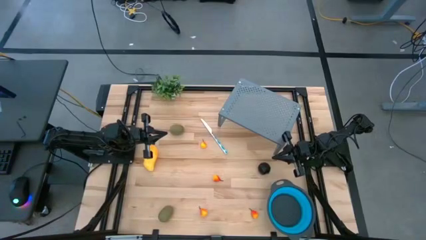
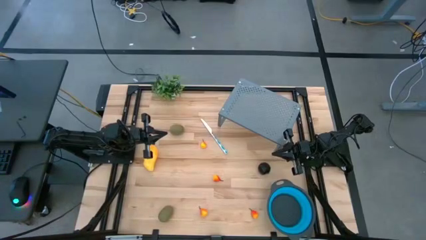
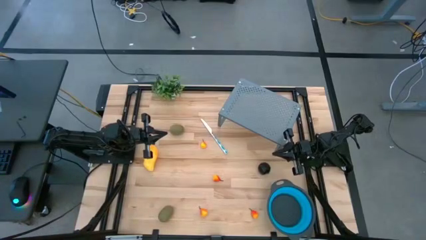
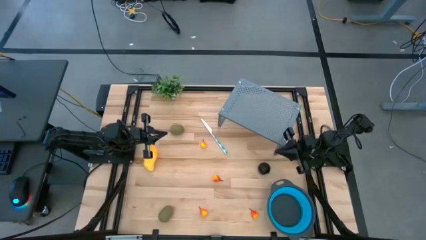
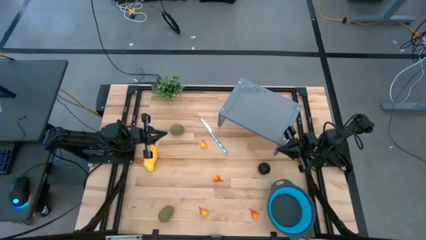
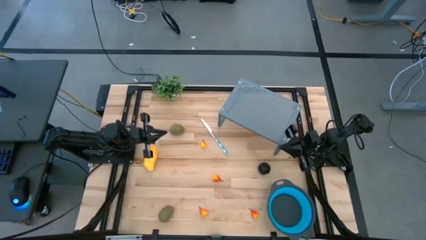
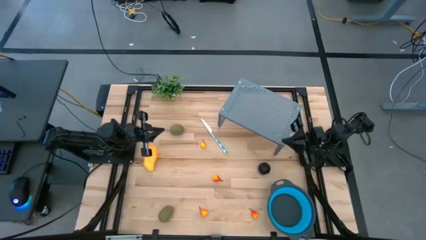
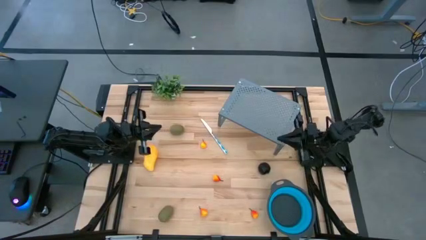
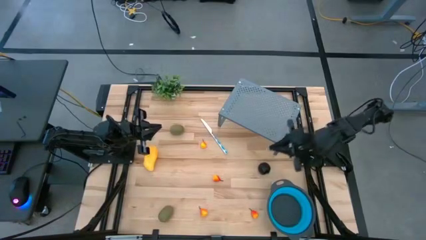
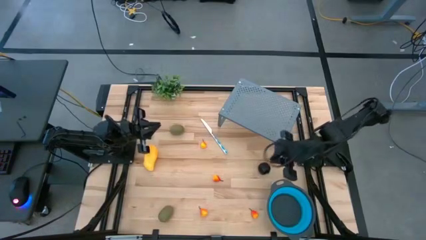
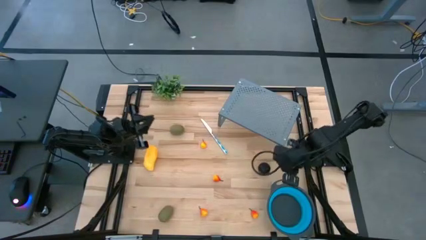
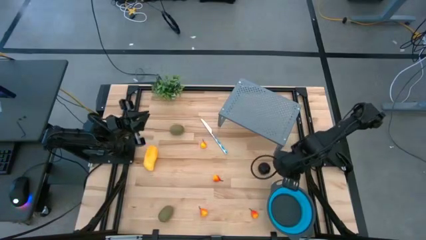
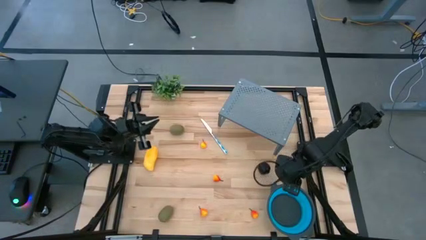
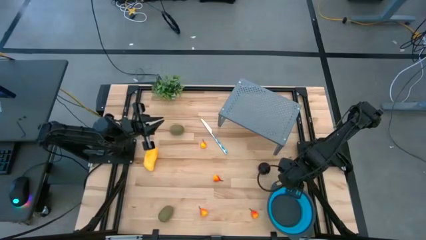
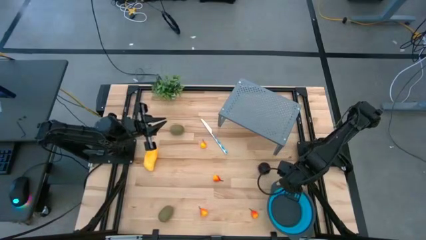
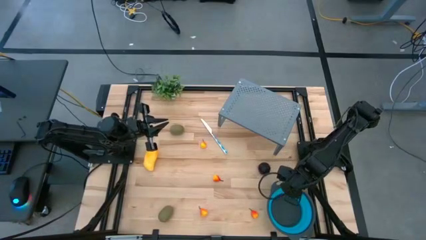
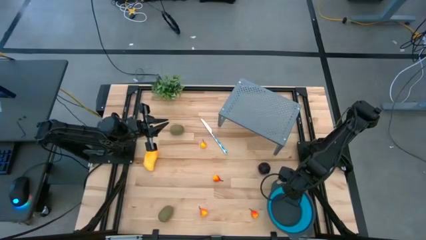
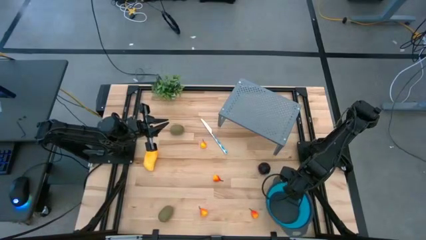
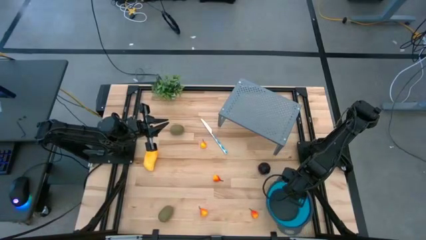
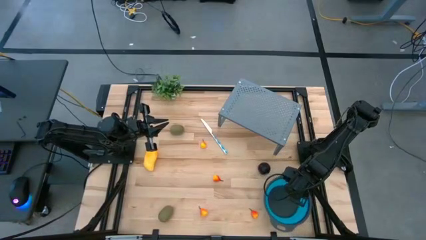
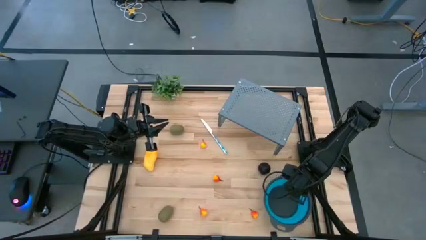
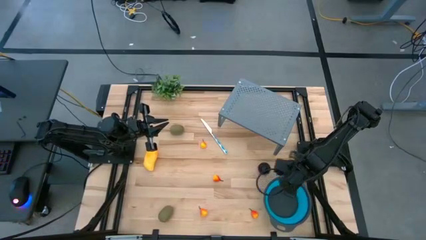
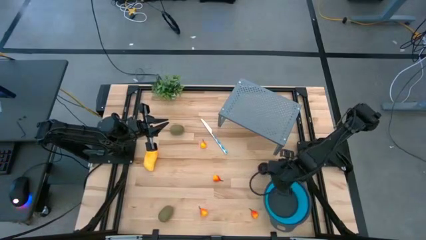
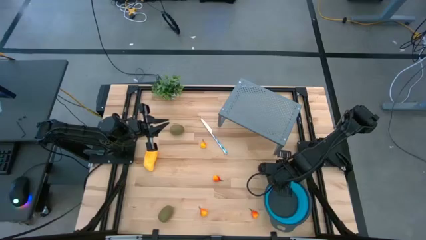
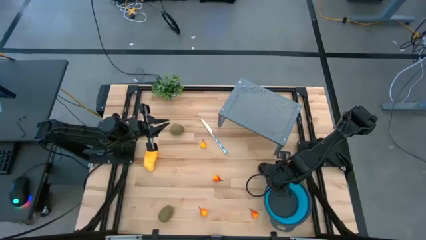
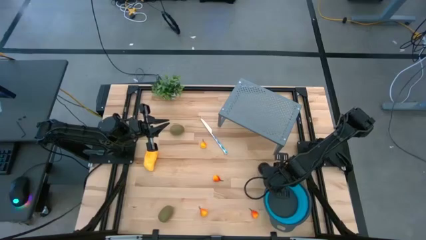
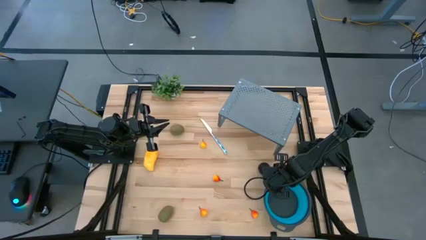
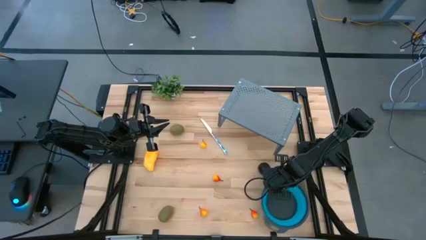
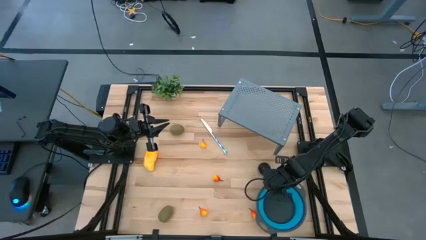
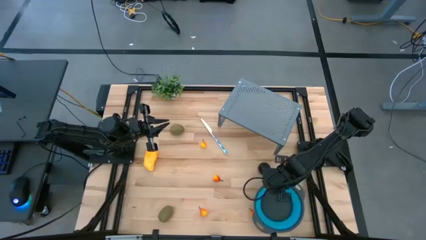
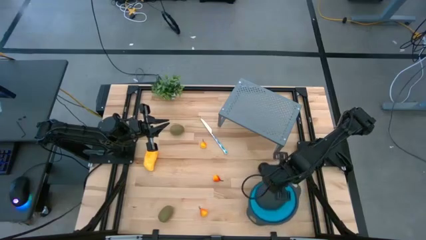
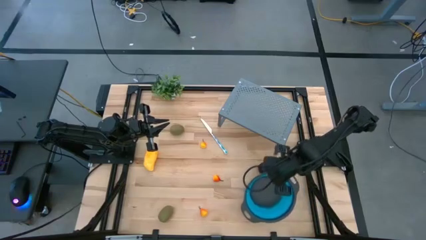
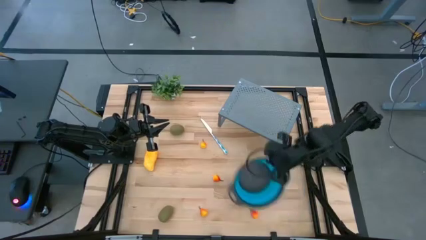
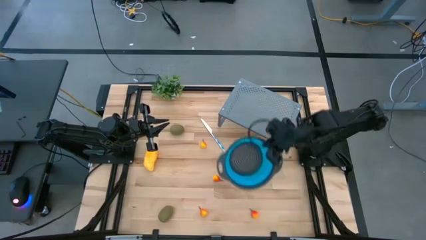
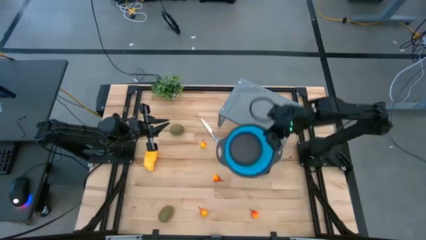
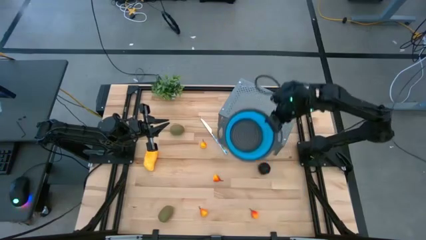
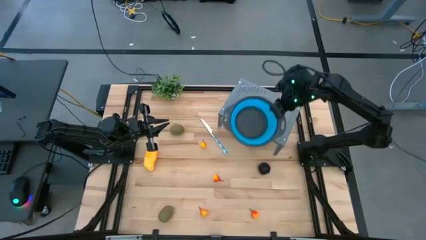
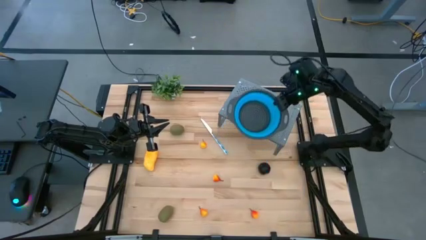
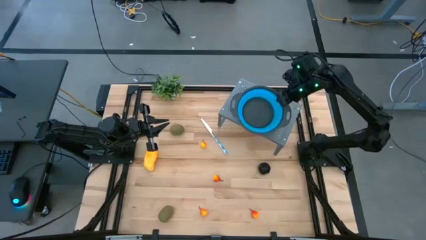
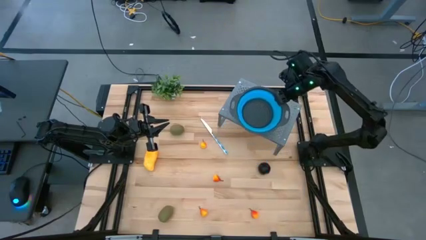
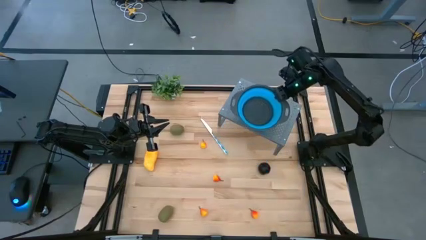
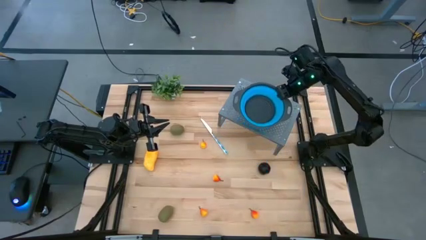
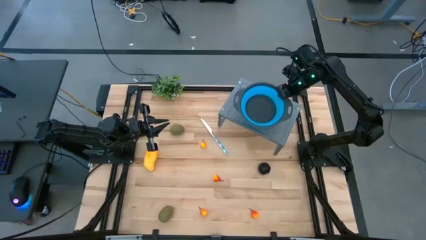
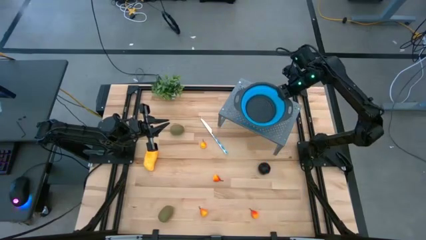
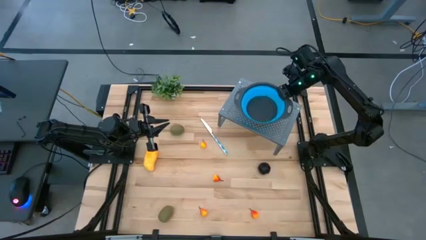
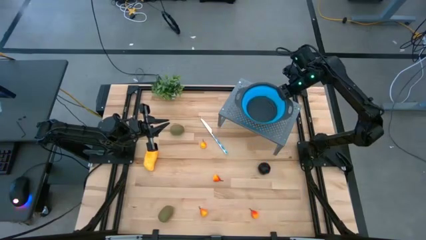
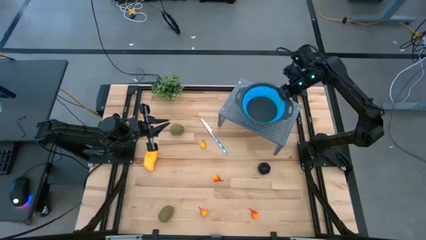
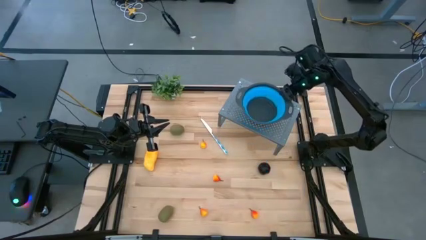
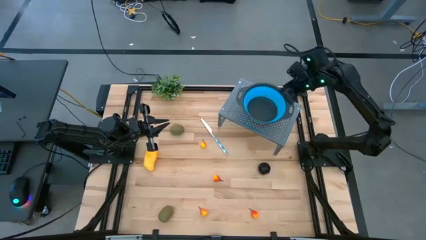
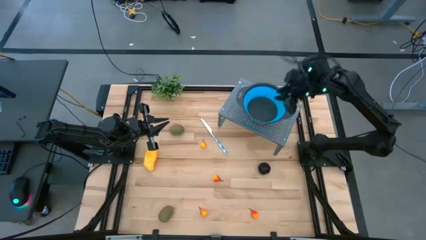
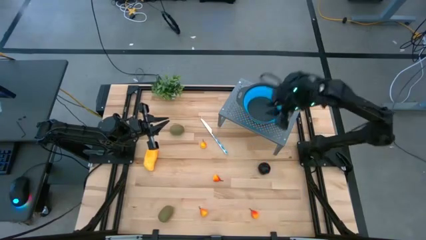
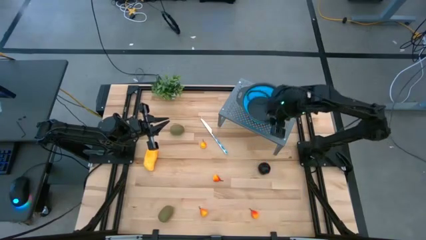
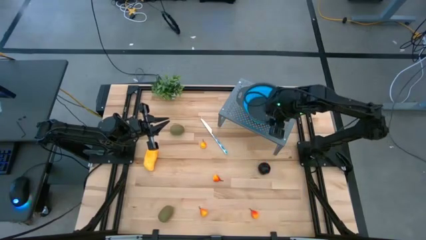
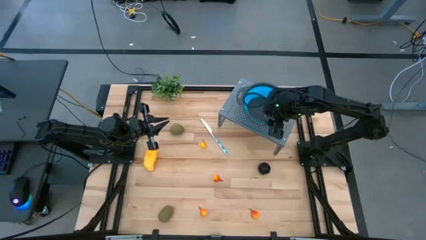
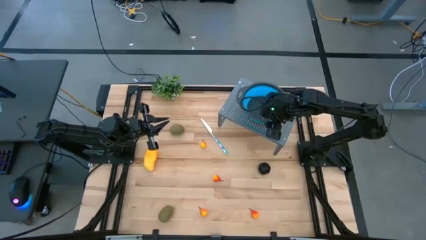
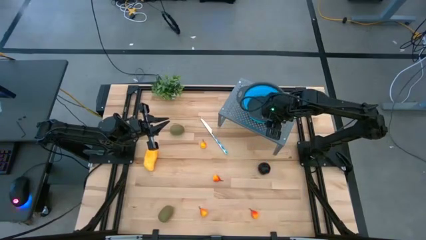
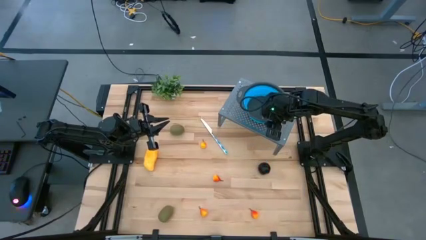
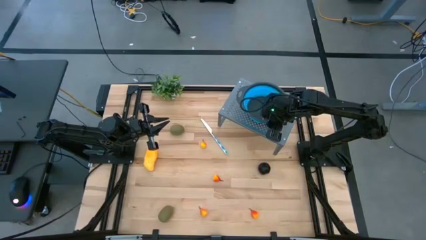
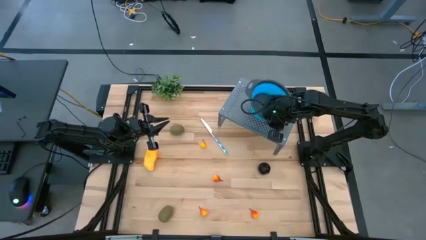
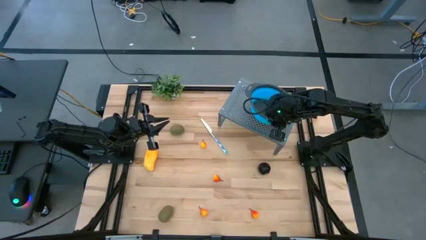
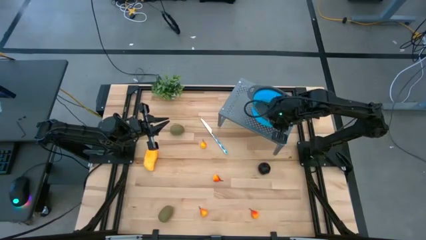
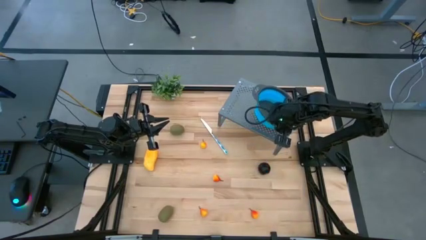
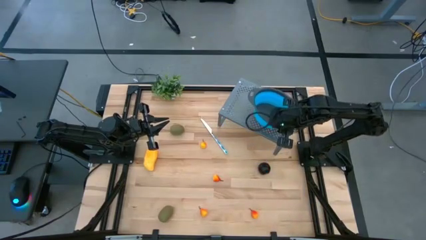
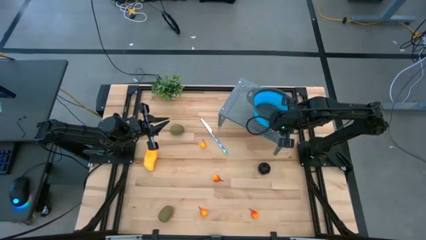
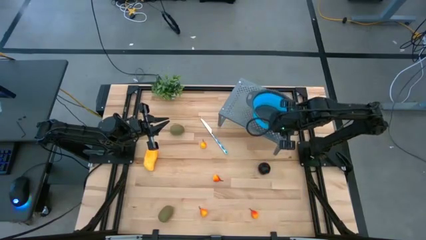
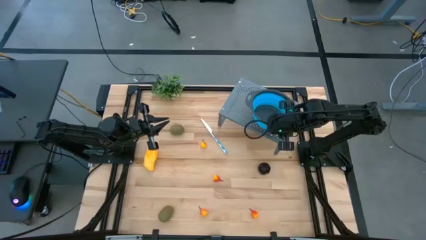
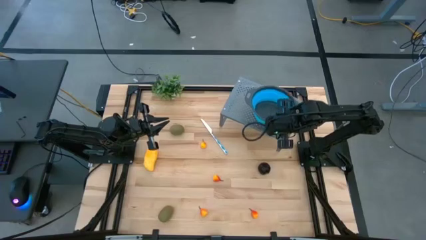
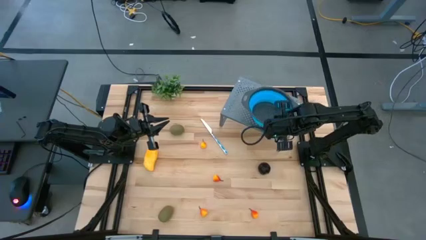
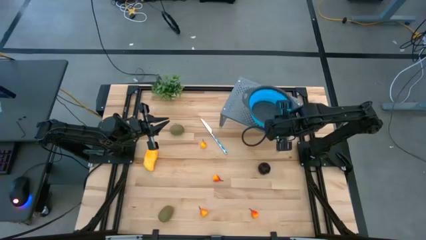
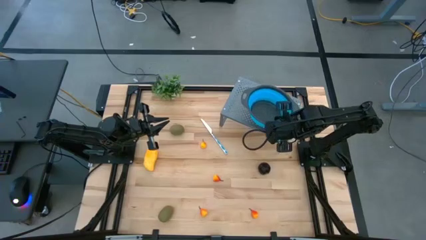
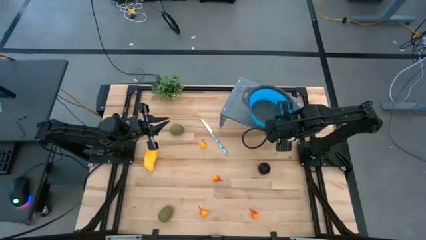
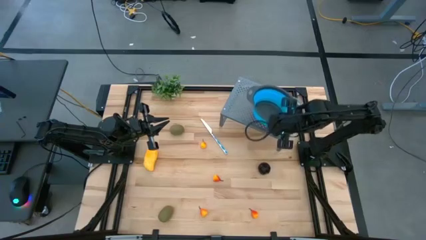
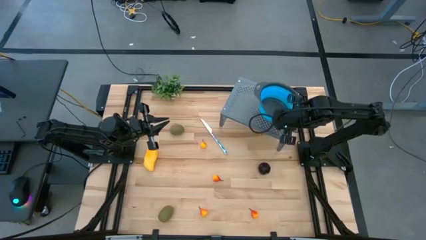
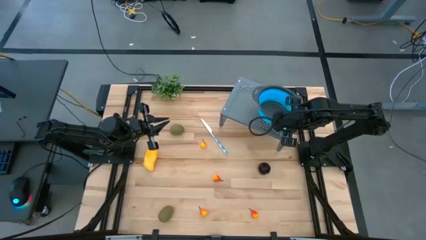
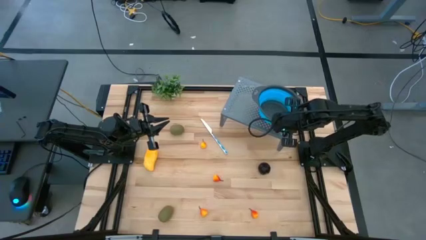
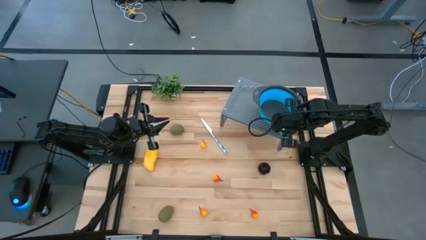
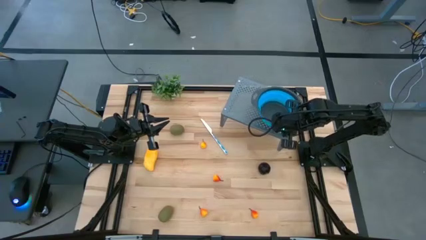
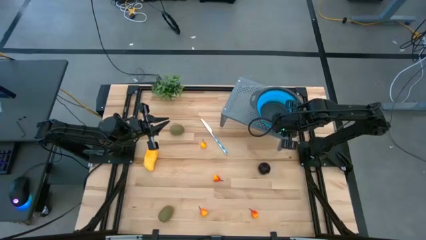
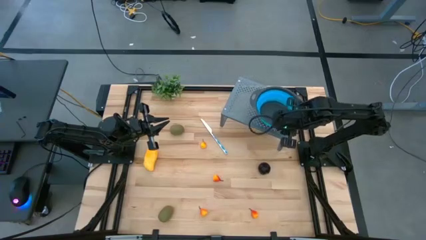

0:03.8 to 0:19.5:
Task: Pick & Place Fruit
Put the blue strainer bowl on the shelf
